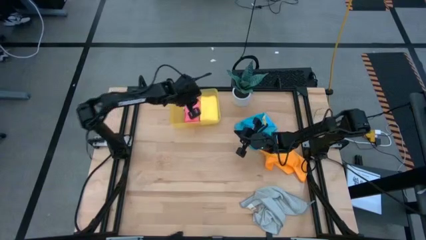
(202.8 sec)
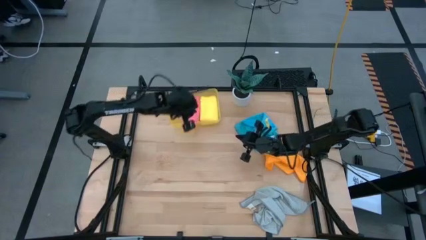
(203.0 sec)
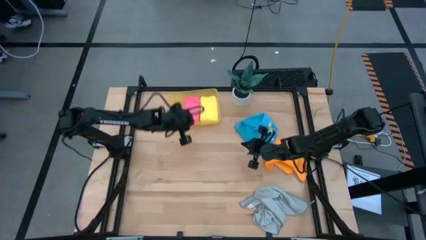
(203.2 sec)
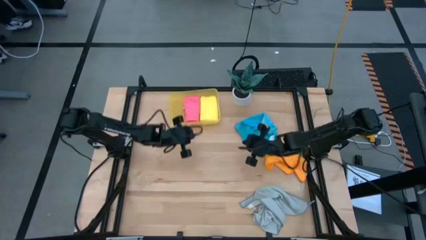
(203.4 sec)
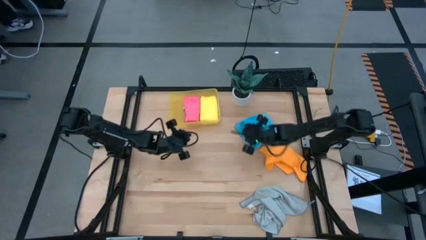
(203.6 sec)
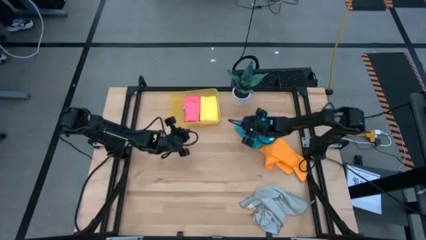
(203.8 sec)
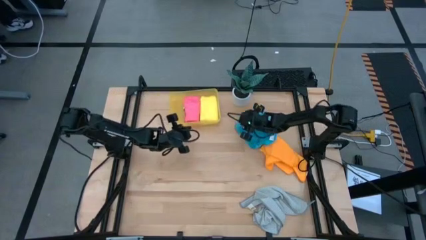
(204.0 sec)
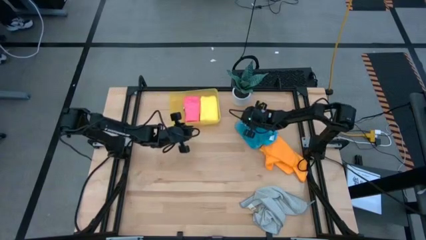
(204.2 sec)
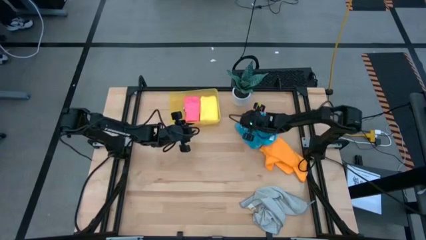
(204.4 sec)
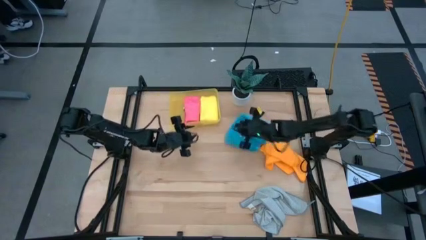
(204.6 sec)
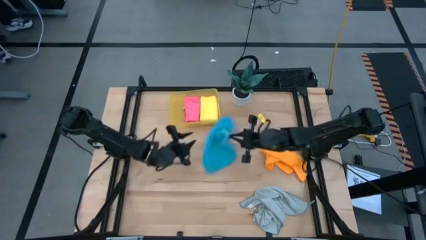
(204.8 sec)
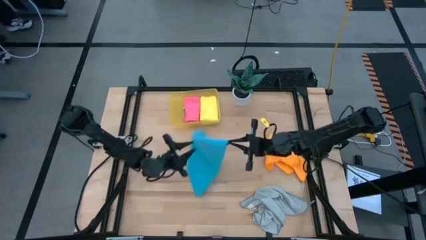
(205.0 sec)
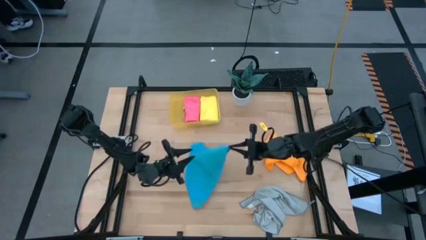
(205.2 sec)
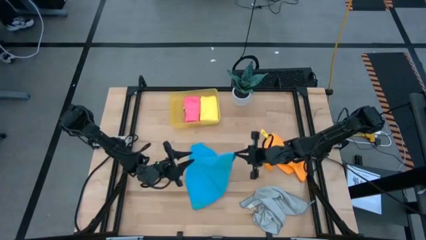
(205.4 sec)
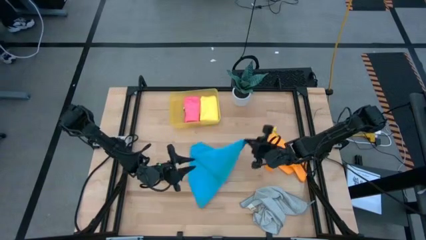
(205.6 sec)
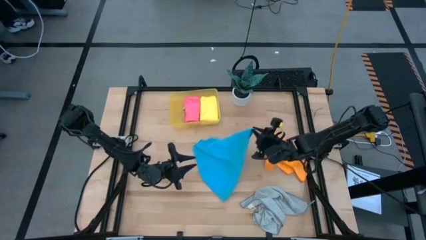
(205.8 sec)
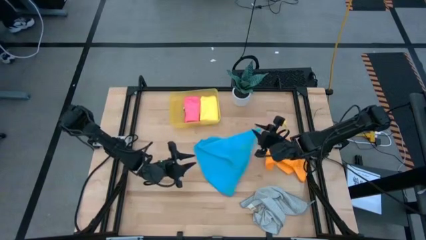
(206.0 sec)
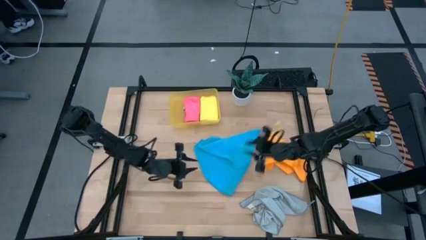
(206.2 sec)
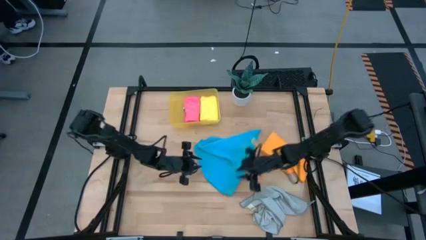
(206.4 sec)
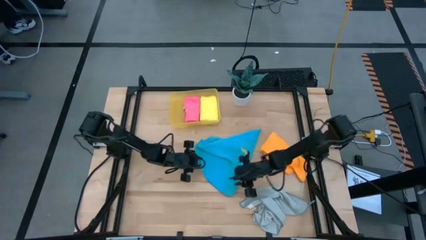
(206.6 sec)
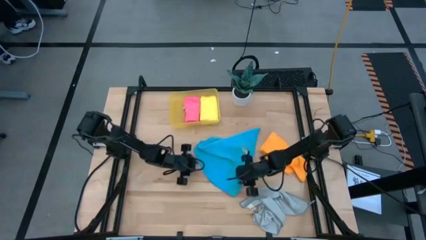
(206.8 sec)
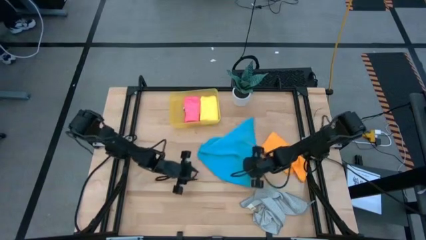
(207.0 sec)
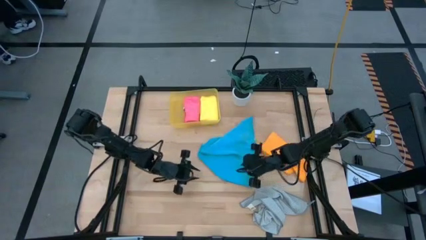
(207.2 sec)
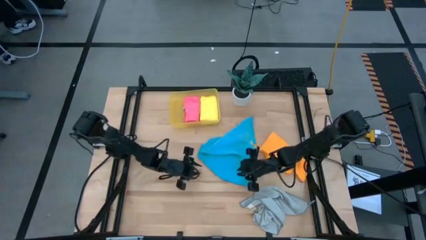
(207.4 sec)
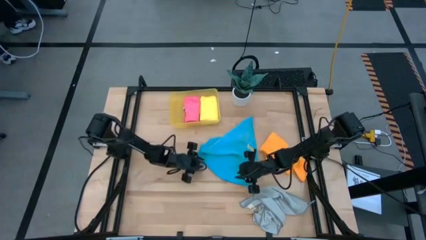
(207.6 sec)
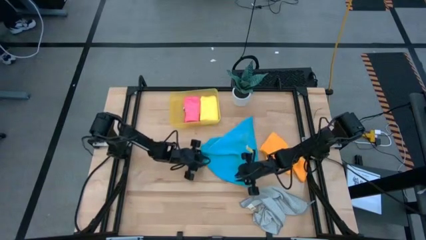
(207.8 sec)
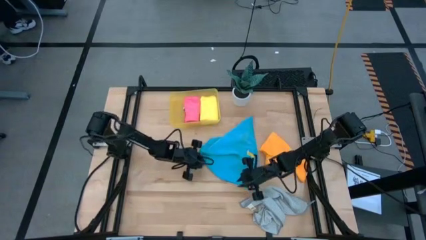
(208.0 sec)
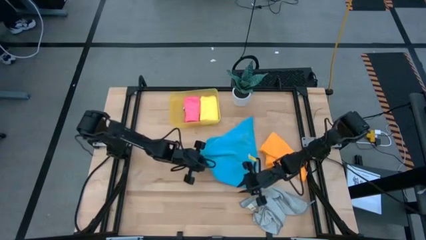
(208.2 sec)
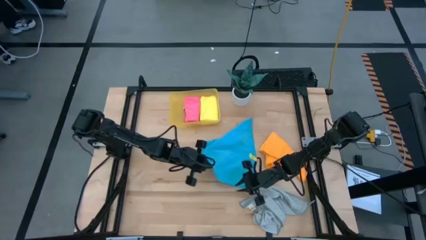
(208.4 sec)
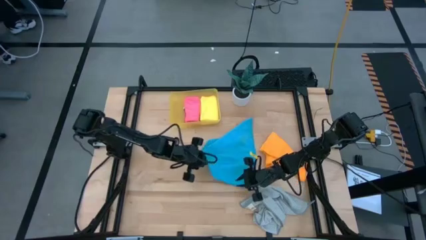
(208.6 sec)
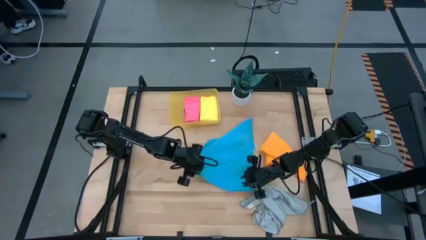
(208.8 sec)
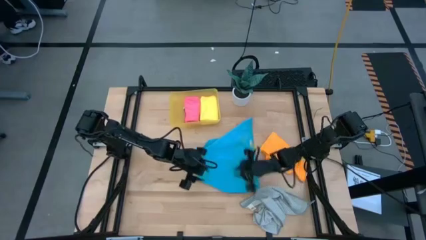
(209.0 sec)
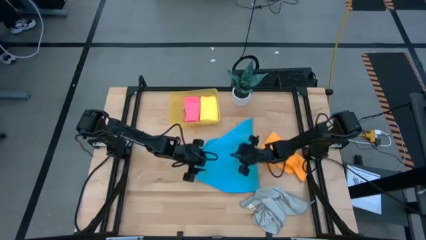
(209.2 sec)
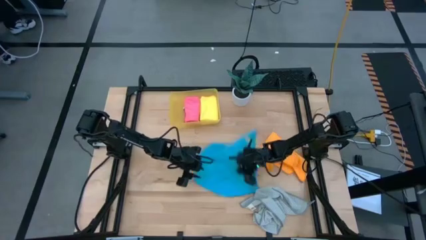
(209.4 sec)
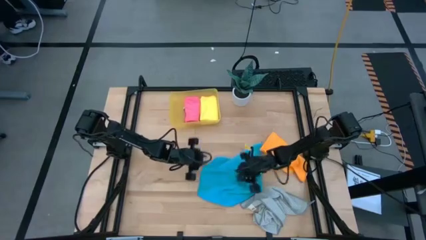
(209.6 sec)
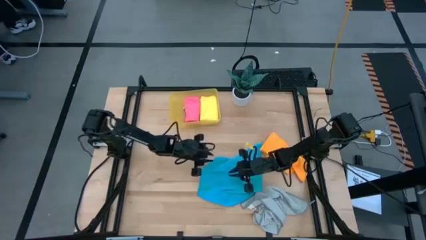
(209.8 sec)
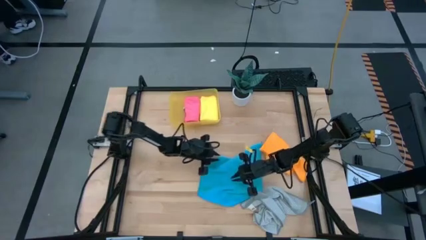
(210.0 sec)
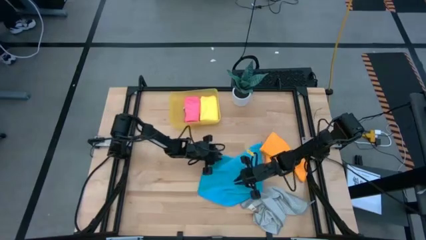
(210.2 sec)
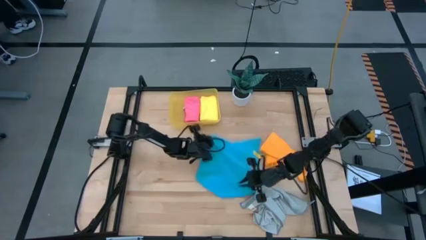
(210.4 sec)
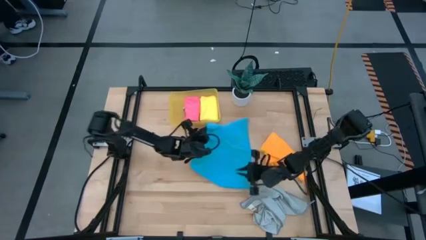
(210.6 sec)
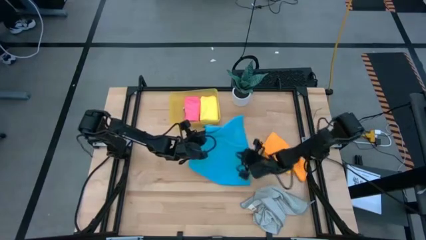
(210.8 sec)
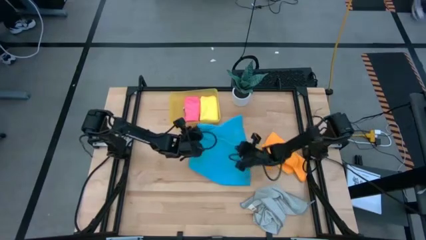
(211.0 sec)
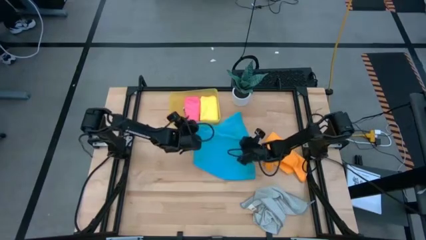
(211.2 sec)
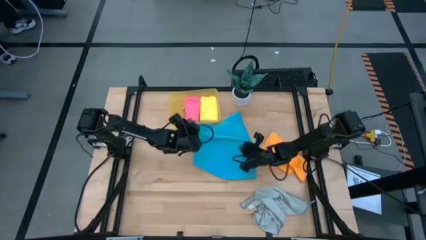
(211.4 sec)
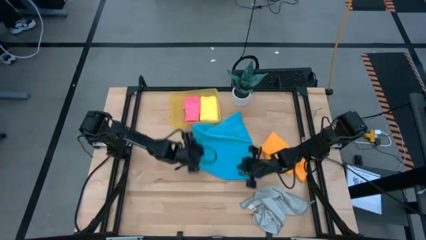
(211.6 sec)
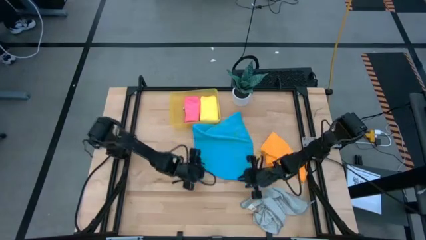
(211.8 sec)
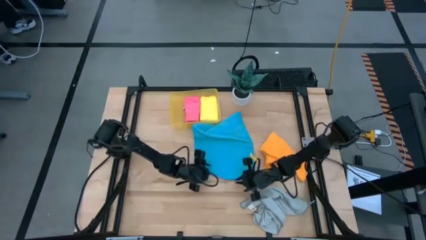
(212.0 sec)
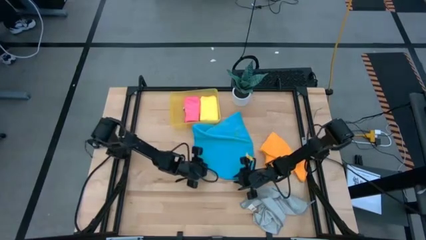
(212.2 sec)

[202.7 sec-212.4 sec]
Task: Fold microfiber towels
Fold the blue microfiber cloth

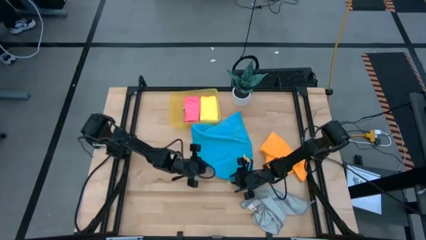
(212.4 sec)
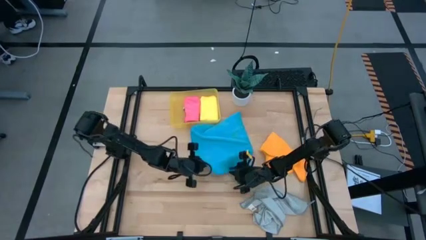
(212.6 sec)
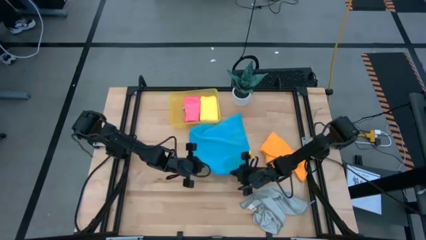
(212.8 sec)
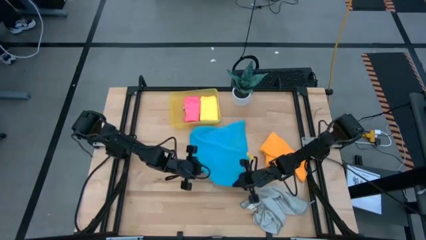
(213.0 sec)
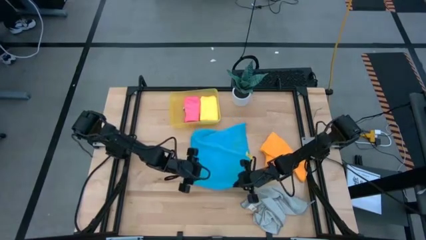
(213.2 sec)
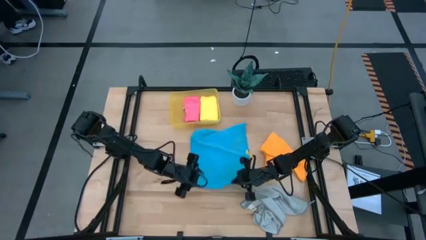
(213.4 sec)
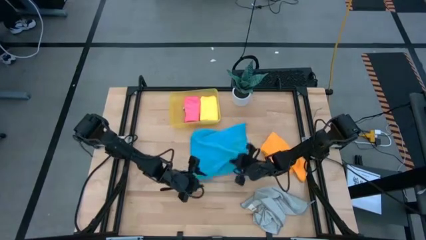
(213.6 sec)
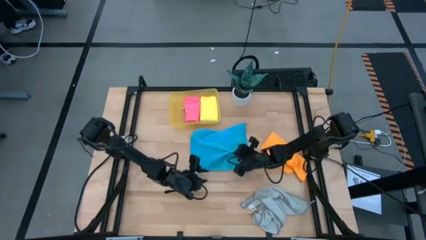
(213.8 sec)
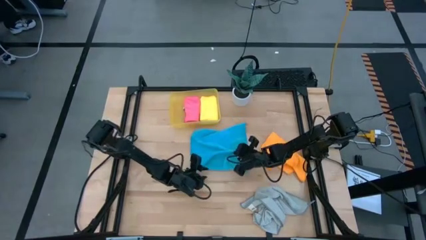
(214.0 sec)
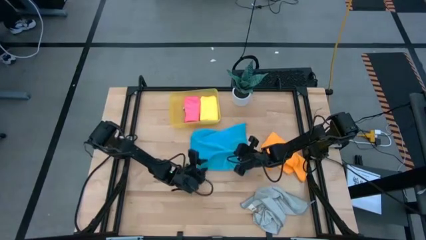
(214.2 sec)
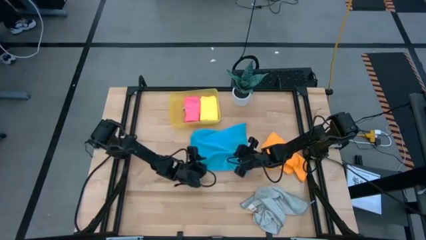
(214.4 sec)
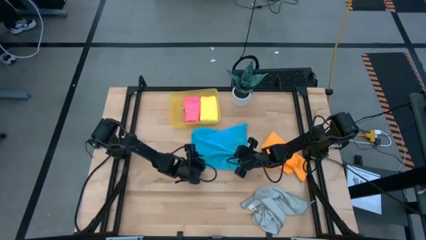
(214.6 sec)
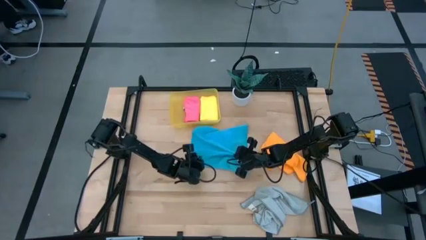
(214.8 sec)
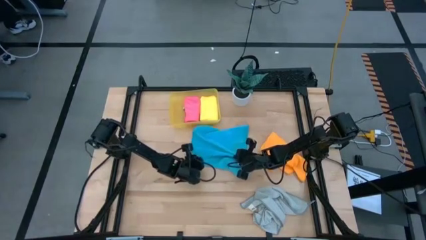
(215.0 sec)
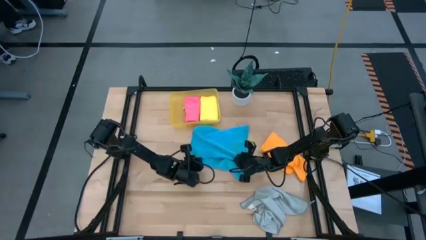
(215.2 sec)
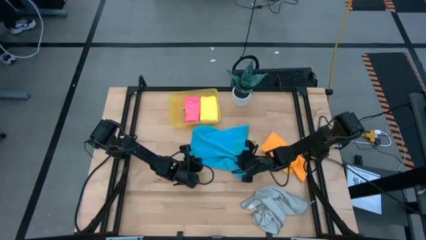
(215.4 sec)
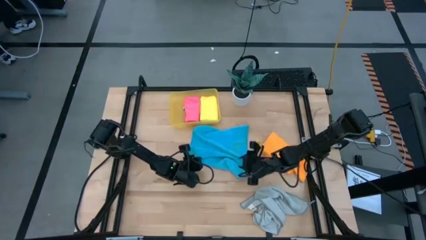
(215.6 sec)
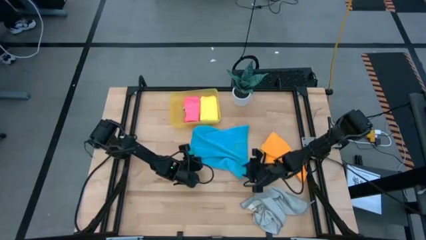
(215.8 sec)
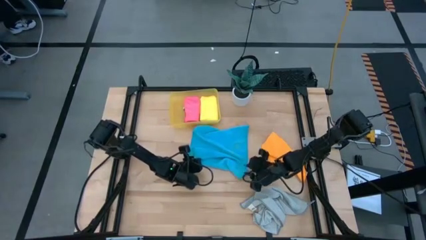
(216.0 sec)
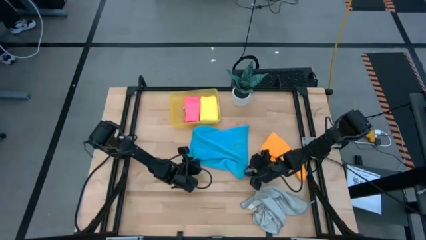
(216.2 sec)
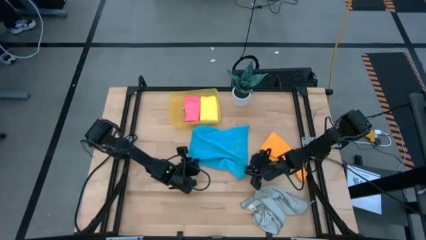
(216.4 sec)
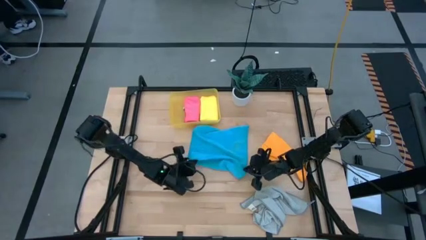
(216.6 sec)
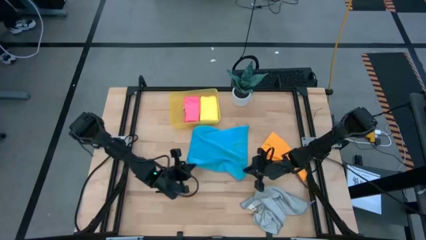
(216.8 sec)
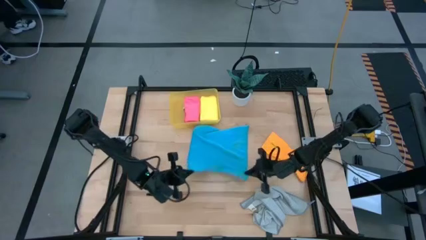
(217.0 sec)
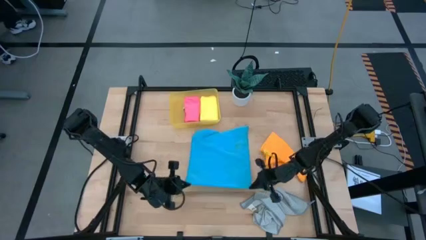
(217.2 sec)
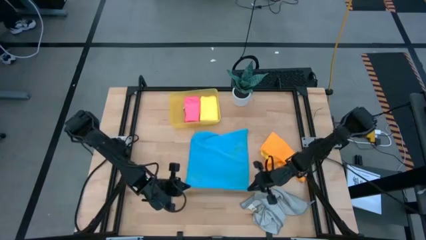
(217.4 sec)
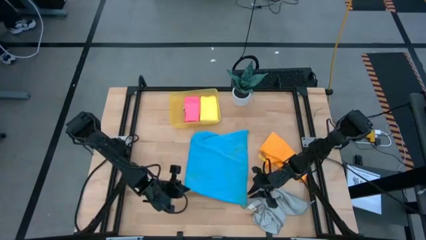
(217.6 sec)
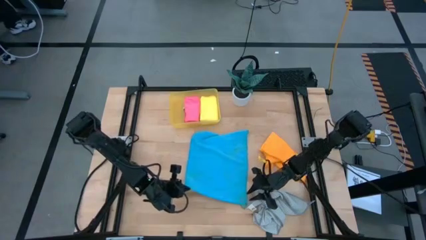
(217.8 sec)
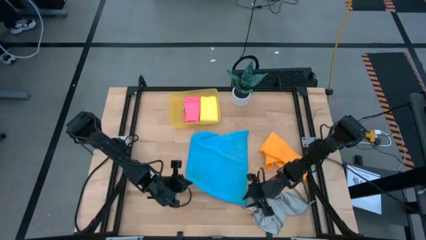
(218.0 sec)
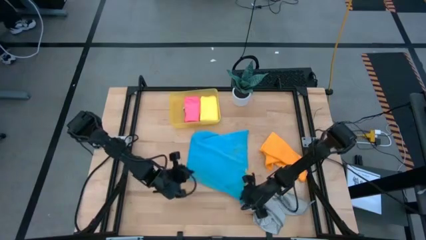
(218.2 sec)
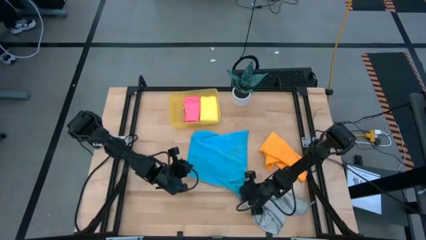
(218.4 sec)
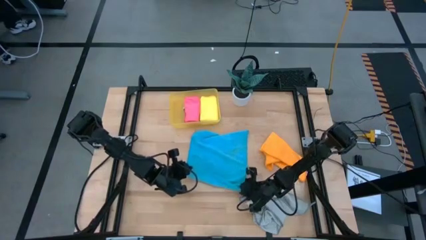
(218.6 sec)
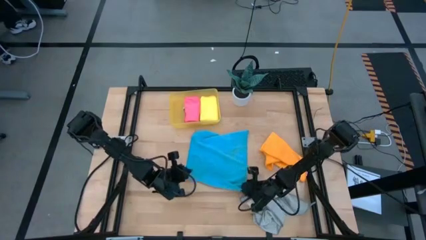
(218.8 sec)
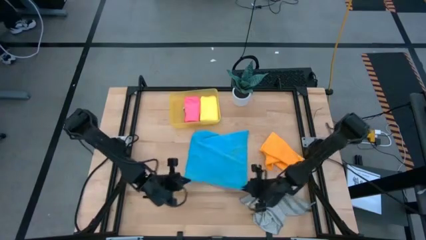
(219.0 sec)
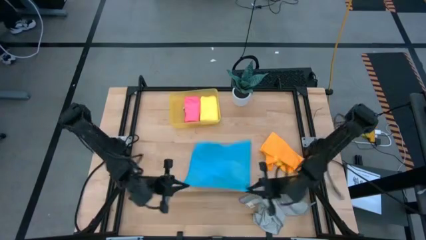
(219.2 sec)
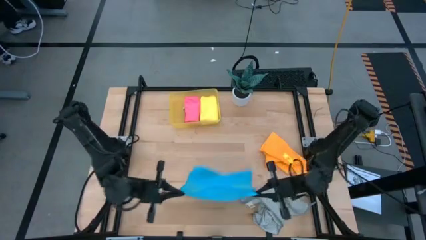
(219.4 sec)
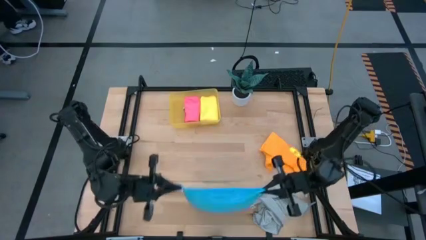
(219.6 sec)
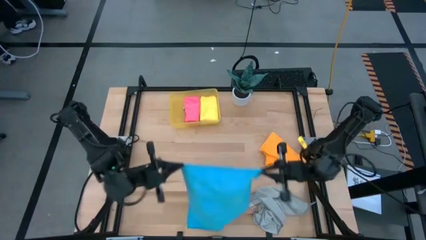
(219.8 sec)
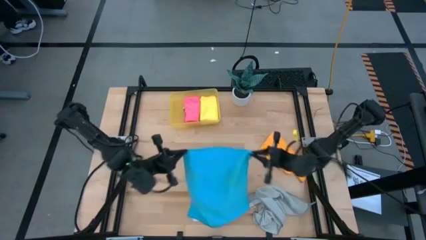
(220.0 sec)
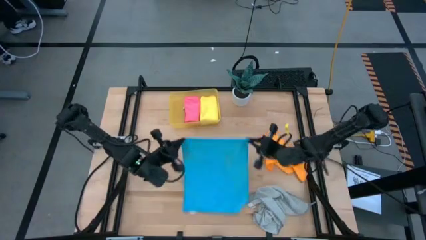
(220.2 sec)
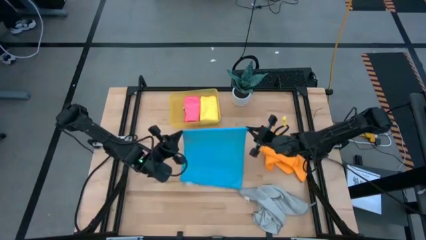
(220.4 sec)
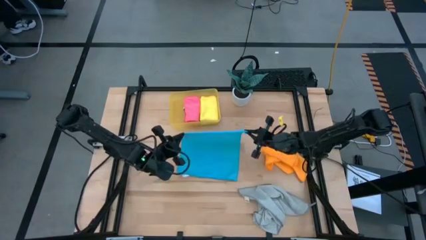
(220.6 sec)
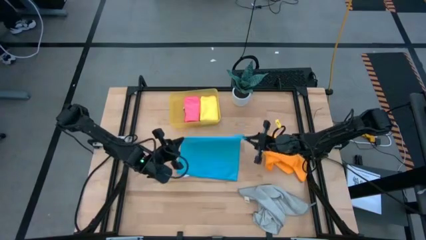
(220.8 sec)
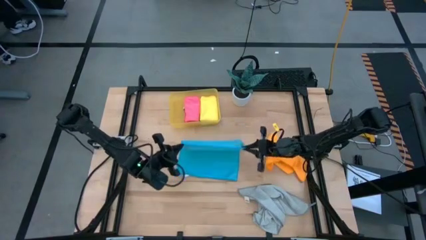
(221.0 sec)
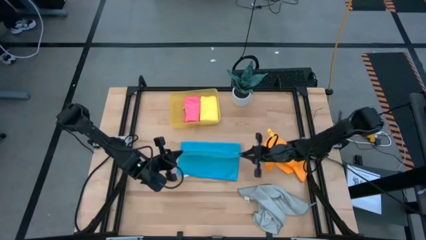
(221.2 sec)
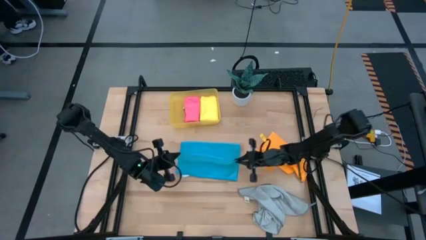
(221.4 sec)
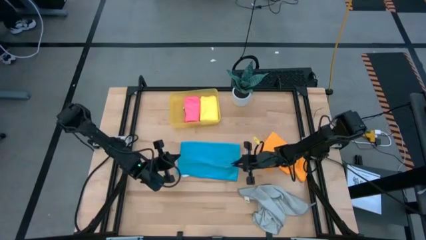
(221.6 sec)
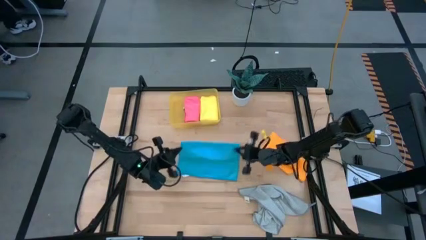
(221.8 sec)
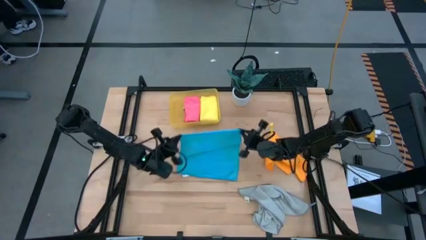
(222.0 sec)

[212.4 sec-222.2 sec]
Fold the blue microfiber cloth
